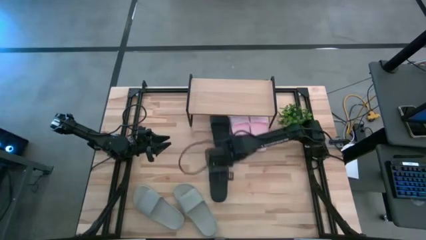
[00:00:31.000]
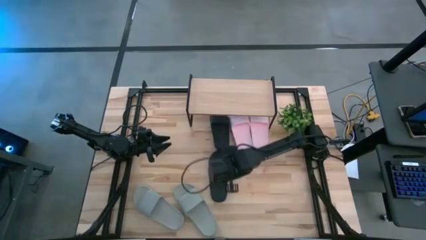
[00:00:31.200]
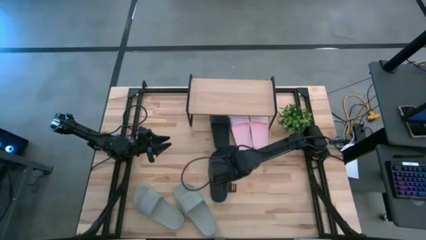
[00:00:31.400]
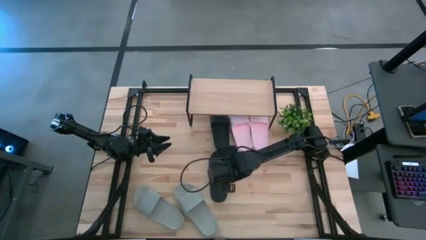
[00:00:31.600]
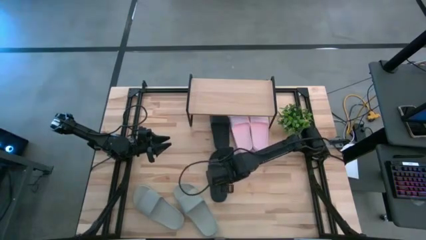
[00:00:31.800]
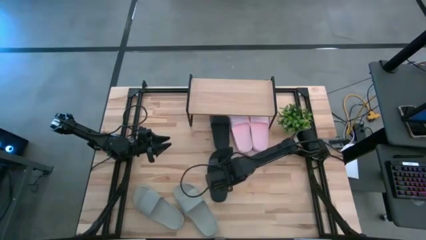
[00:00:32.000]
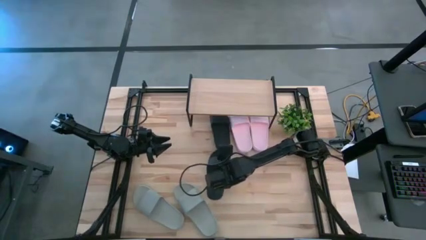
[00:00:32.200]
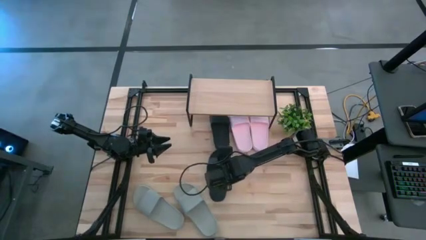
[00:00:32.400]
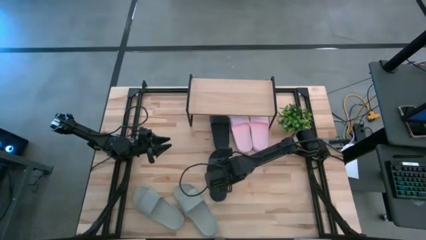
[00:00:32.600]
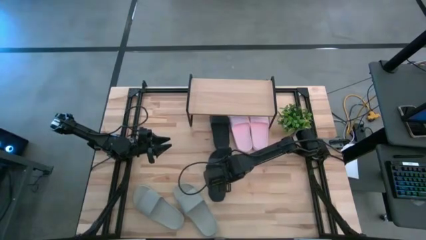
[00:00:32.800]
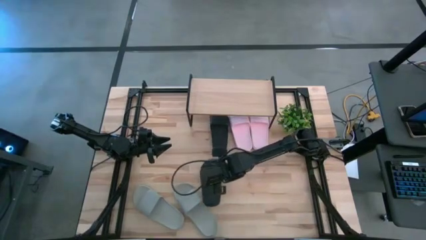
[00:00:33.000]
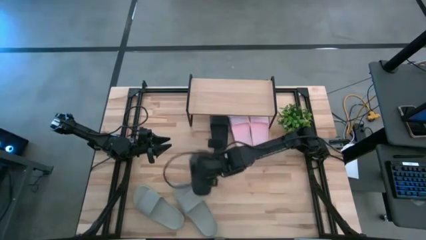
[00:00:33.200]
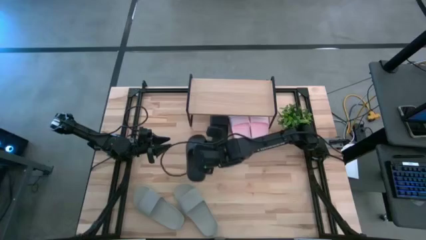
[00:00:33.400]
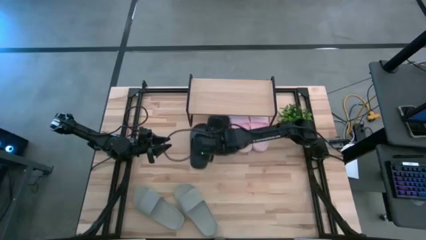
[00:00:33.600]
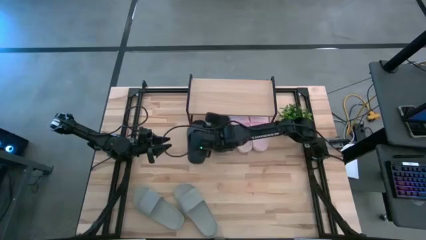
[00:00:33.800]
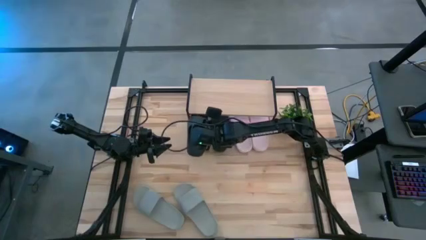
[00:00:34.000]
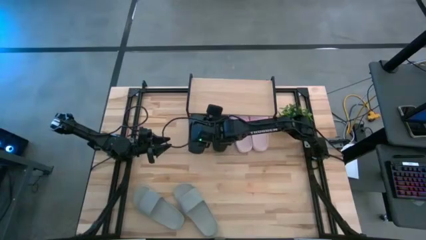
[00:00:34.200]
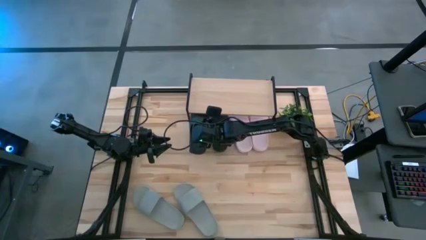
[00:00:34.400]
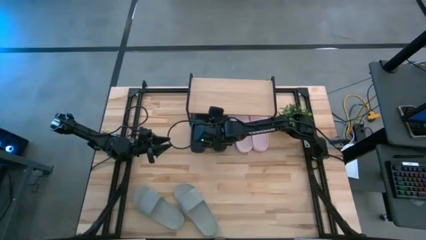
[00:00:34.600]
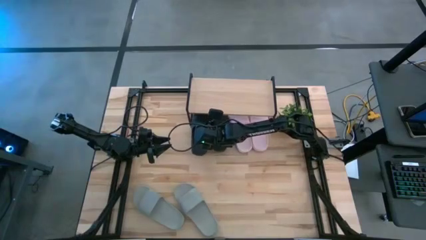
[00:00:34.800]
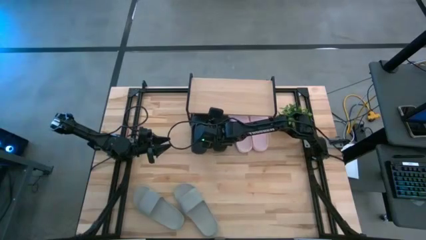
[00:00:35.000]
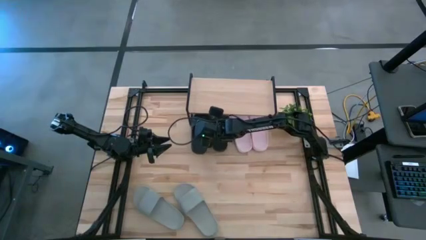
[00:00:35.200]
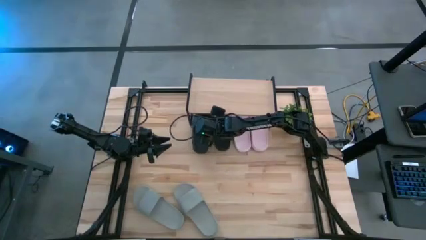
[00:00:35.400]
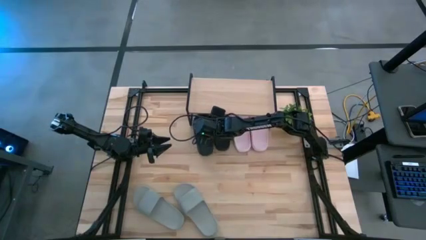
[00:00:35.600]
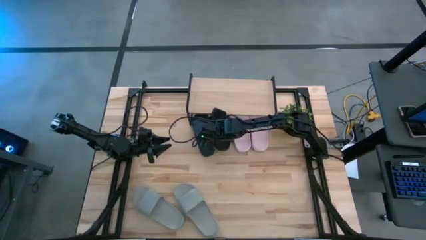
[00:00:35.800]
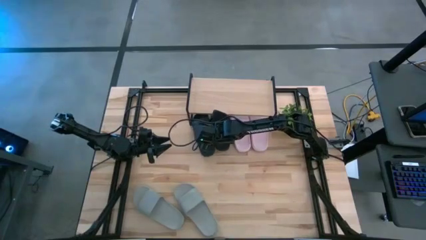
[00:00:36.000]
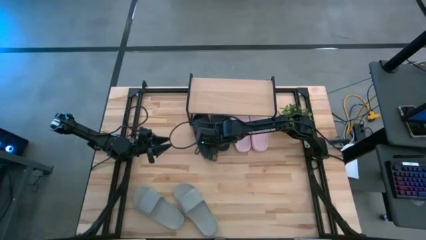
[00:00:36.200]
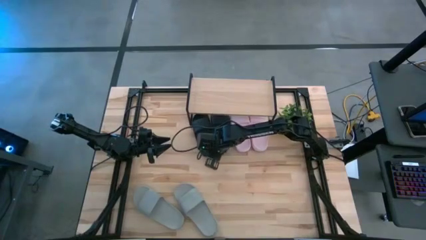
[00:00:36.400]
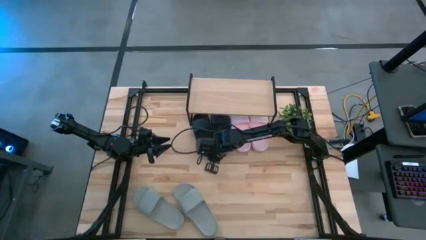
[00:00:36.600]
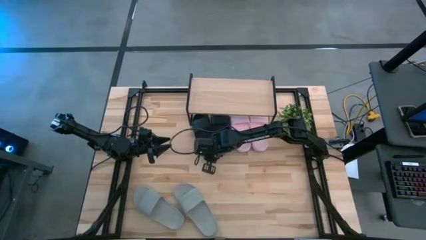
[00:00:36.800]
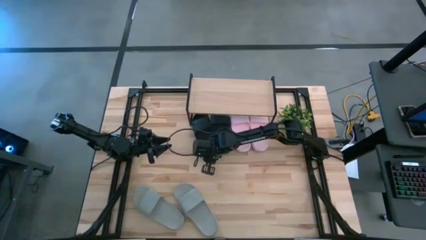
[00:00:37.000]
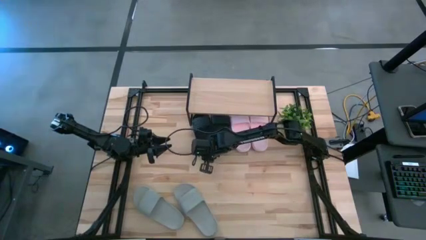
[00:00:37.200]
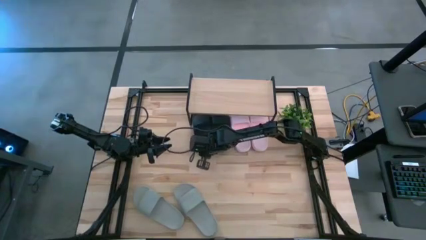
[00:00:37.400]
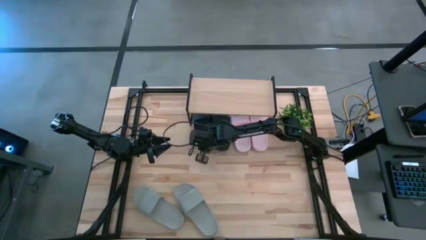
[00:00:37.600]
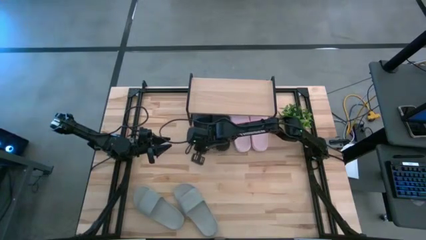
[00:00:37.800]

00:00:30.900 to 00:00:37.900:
Task: Pick and place slides into the shelf
Put the black slipper under the shelf

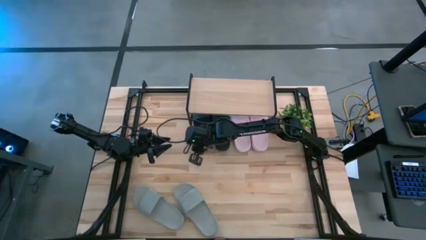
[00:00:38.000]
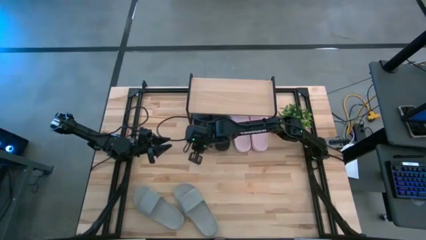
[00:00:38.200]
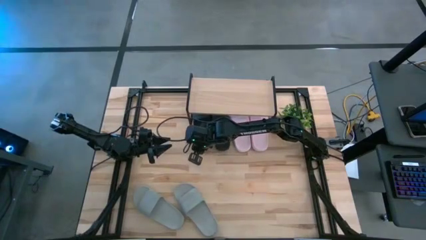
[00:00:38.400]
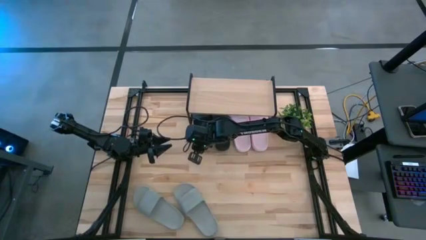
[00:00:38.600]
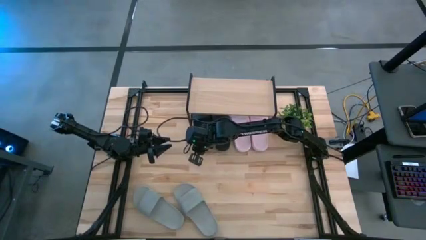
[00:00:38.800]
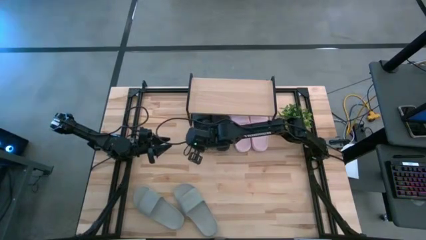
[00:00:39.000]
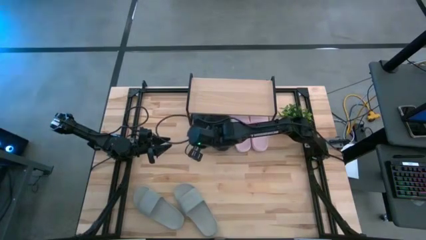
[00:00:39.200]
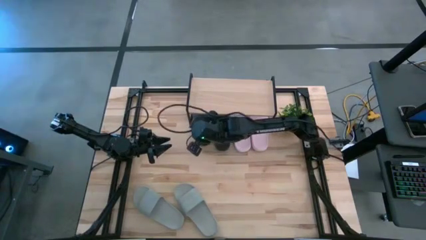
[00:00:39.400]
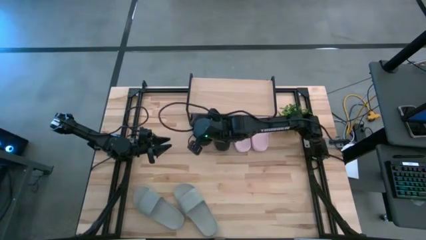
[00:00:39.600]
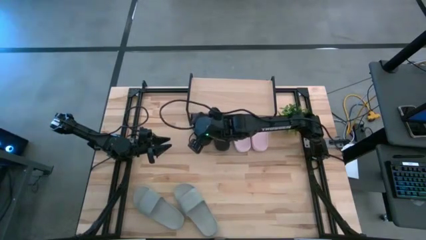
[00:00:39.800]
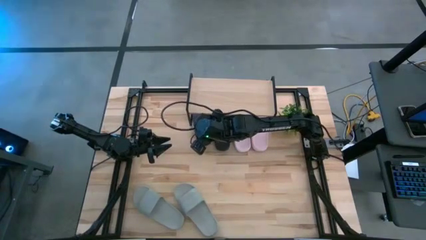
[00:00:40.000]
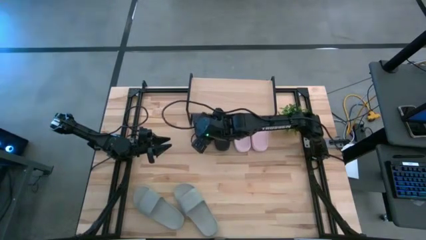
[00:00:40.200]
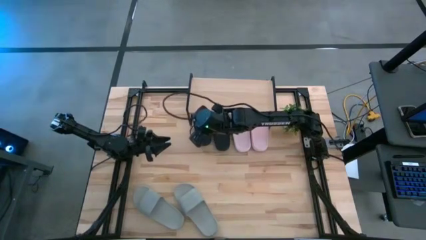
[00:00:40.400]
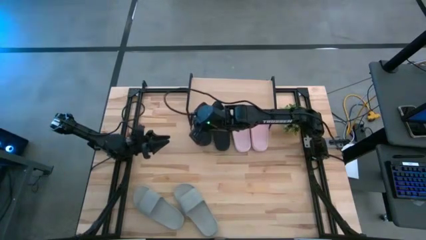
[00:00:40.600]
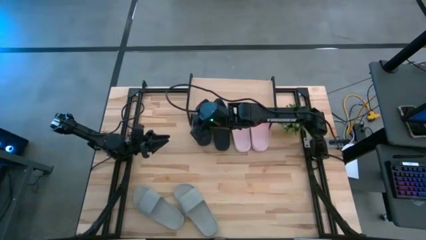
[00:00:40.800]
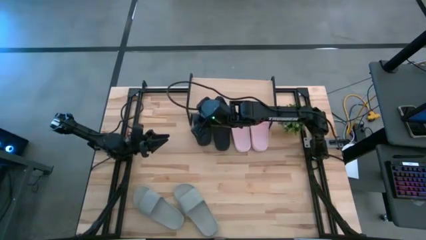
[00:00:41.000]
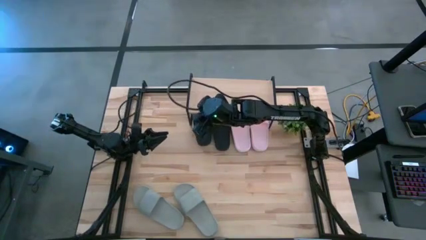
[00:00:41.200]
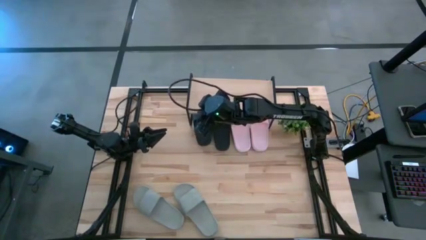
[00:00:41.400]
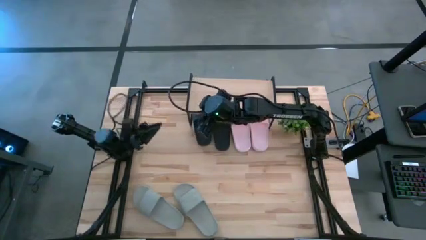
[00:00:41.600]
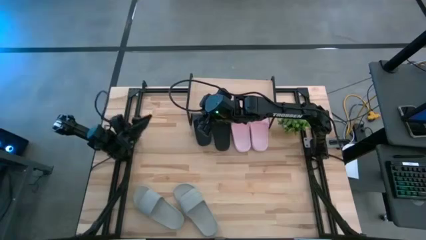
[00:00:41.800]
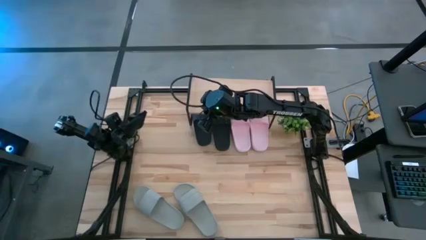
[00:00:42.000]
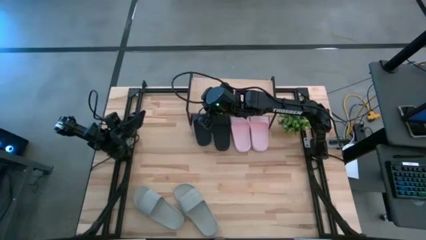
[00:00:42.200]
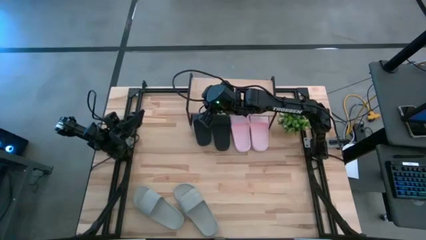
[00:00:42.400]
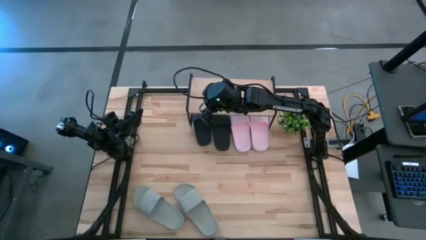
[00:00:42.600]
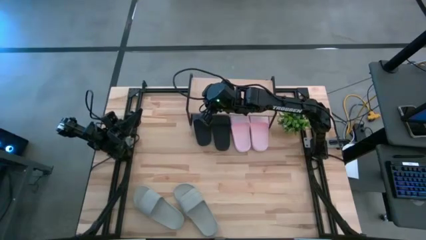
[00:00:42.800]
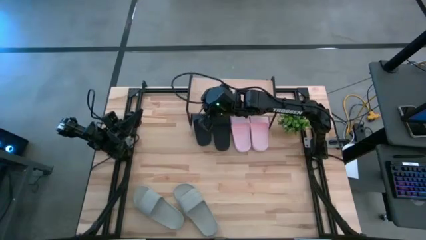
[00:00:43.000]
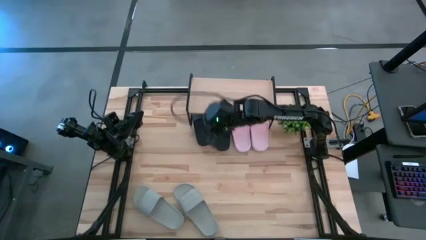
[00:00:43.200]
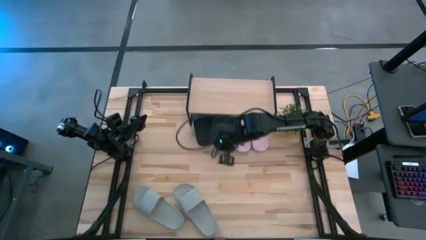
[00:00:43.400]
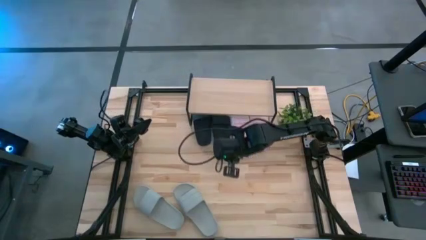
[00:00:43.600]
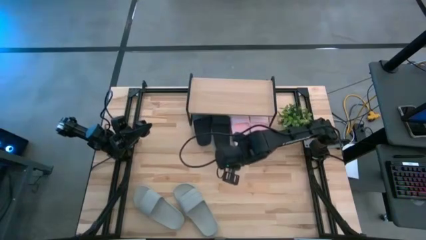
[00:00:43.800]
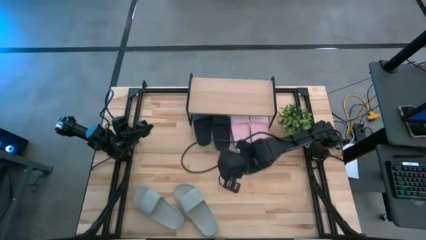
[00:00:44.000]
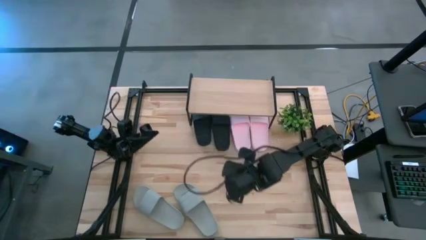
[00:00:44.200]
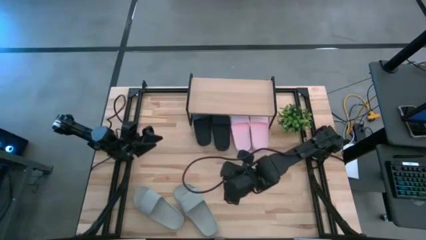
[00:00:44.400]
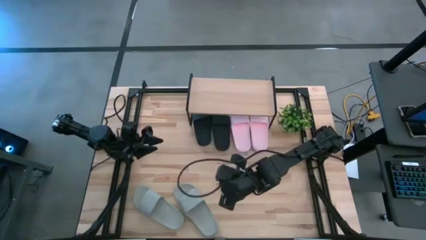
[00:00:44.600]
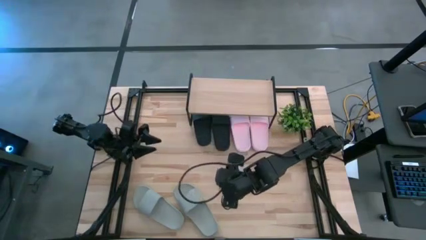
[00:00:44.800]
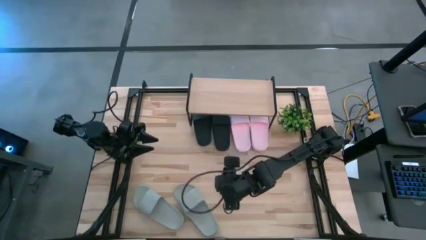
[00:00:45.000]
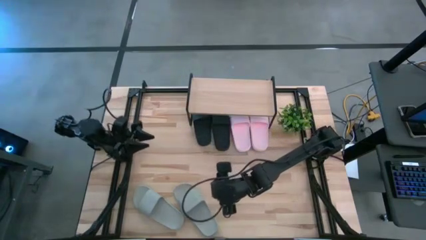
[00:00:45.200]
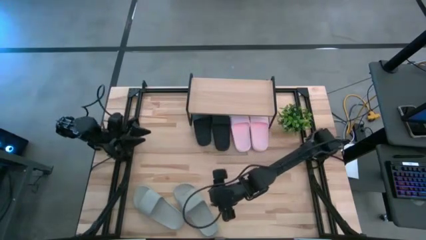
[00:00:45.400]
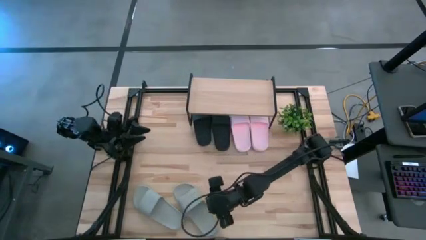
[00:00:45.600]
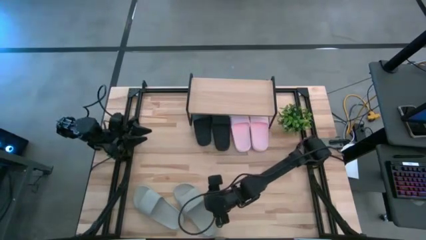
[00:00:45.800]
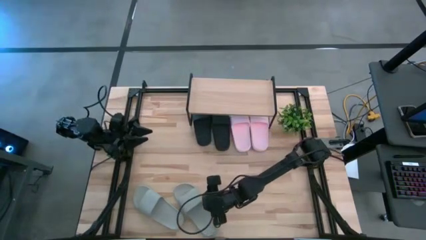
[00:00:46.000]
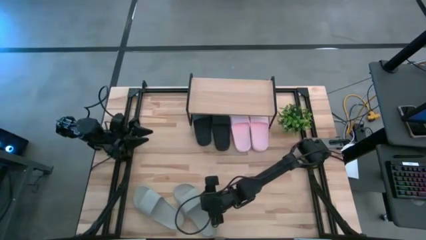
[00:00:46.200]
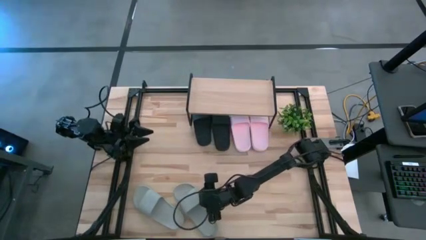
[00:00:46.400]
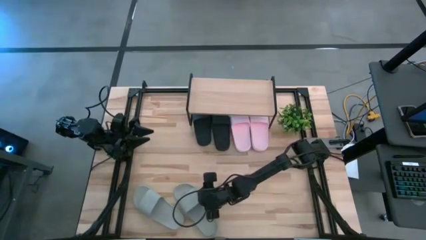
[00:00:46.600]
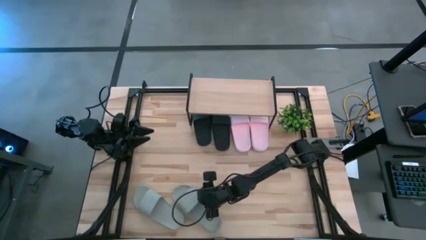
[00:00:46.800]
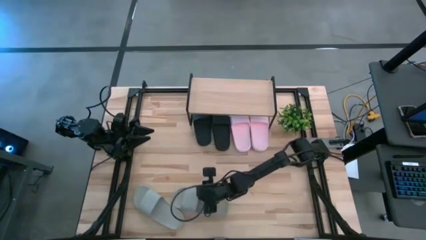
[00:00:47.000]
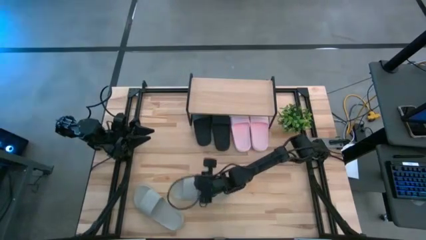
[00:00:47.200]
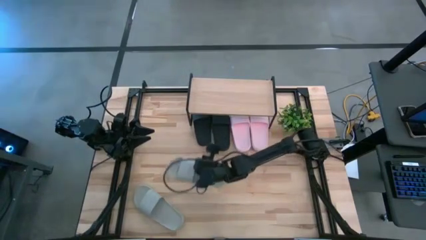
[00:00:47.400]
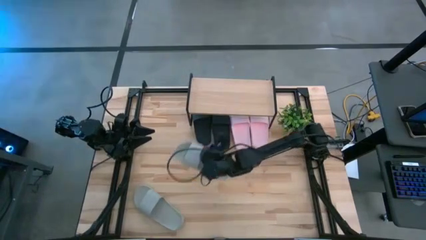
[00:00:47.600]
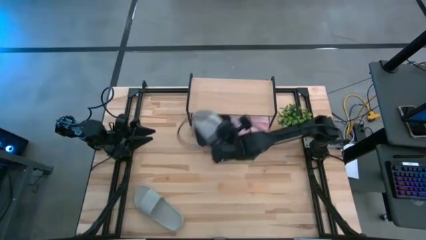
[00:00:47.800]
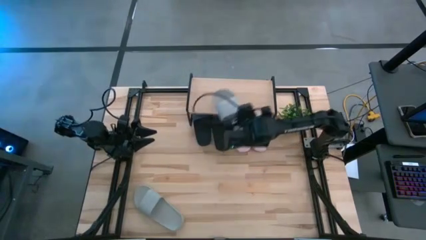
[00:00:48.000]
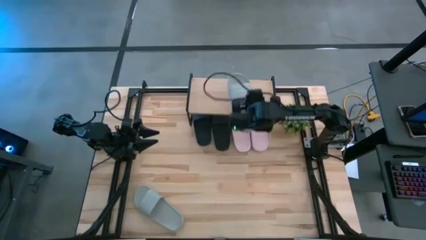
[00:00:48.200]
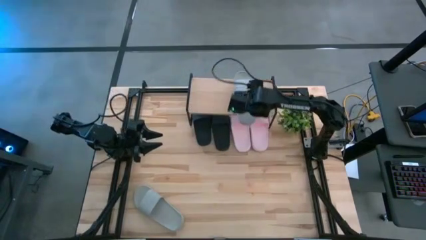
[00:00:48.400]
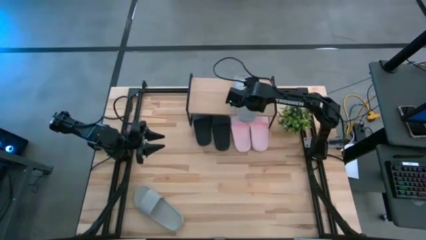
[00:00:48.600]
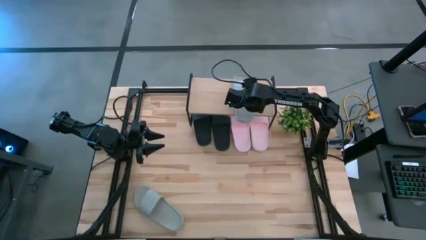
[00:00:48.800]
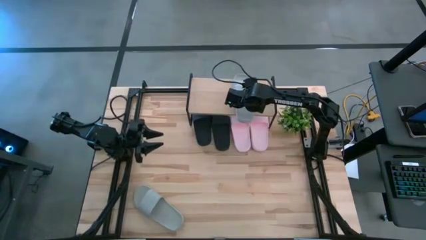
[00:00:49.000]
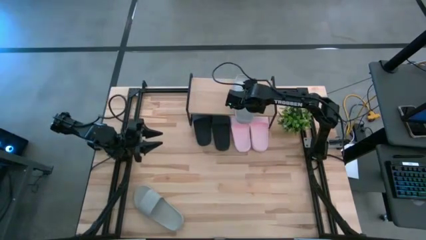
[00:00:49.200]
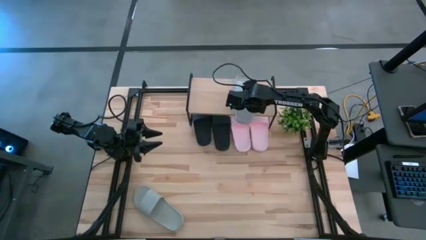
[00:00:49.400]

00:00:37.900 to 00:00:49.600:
Put the right gray slipper on the shelf
